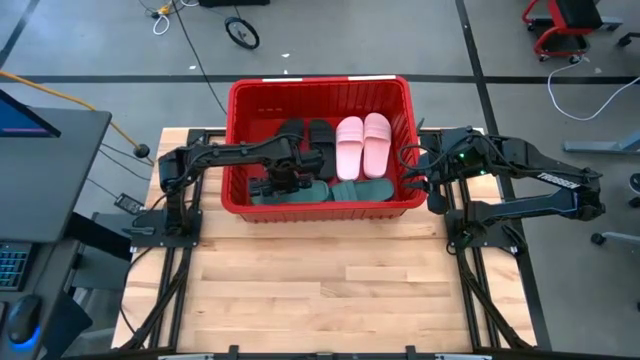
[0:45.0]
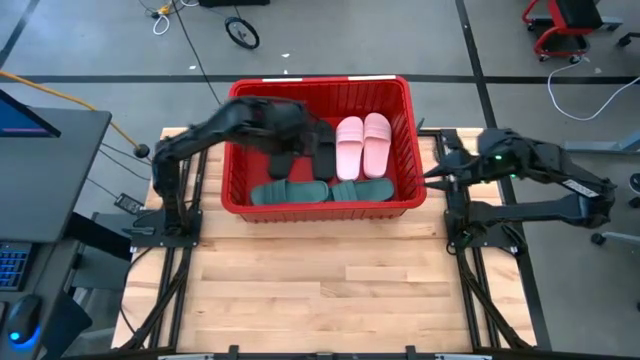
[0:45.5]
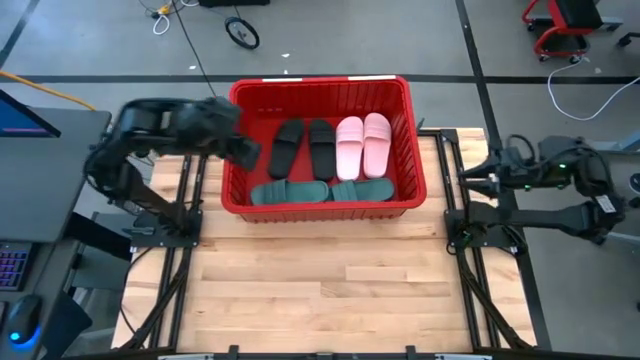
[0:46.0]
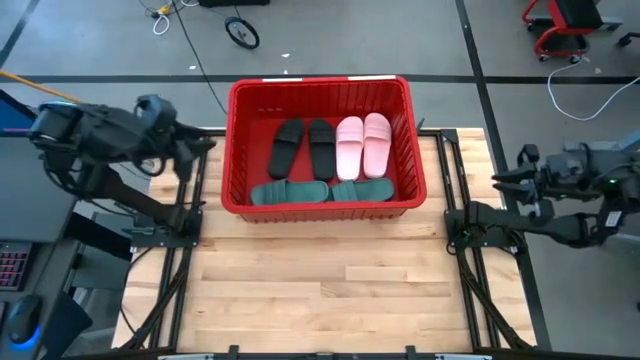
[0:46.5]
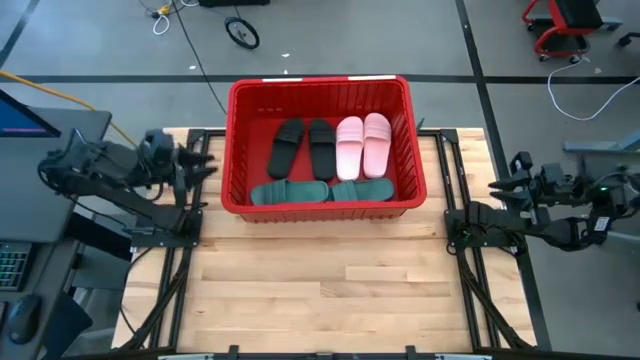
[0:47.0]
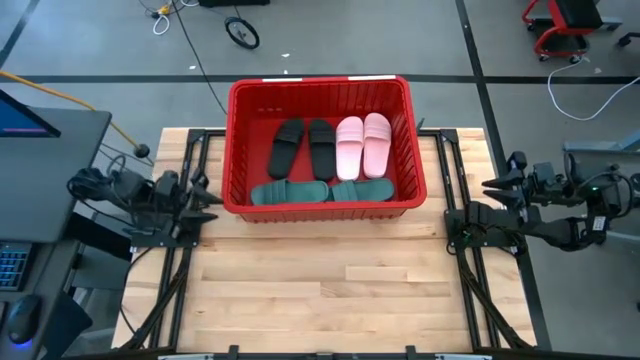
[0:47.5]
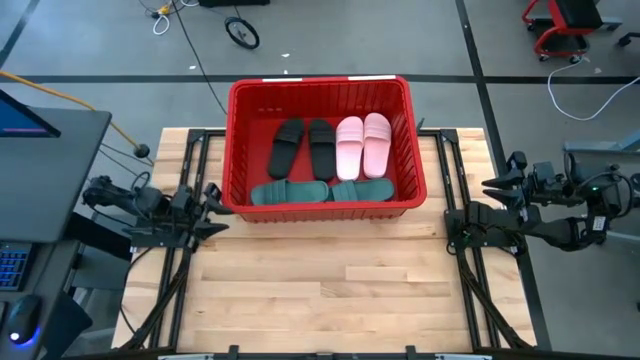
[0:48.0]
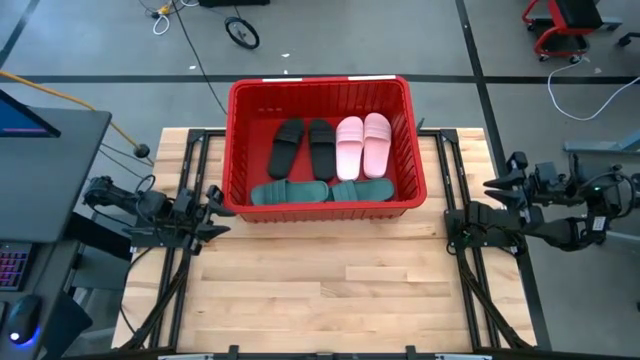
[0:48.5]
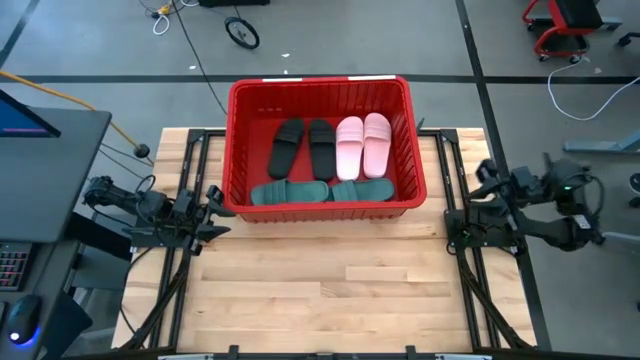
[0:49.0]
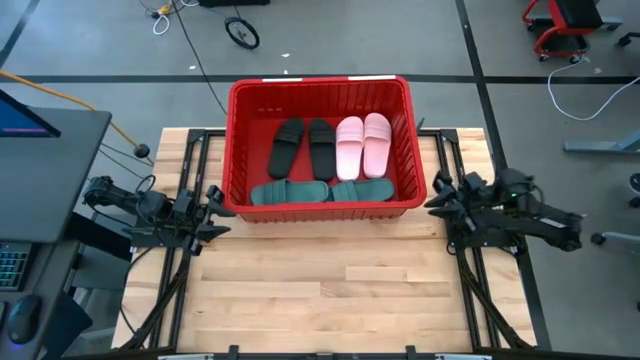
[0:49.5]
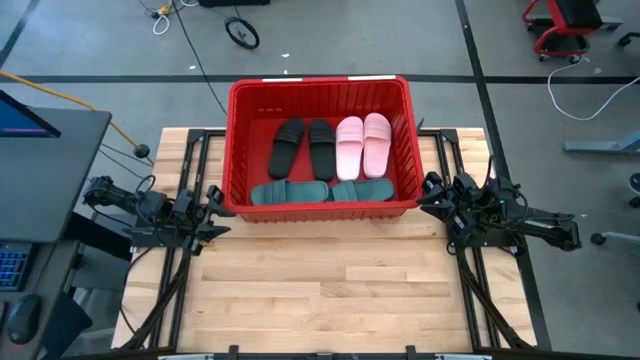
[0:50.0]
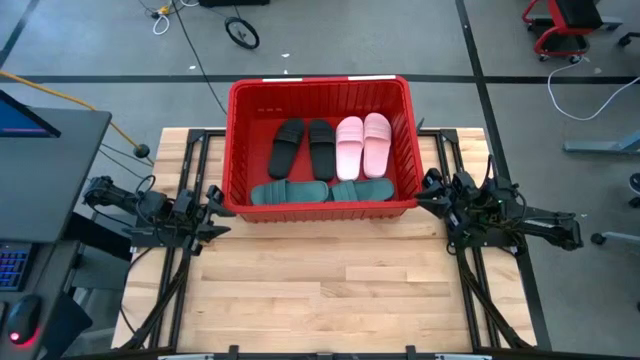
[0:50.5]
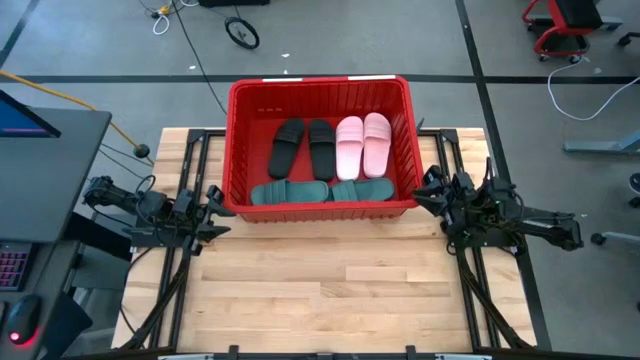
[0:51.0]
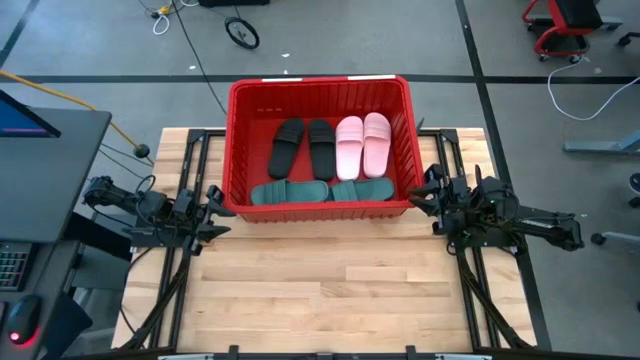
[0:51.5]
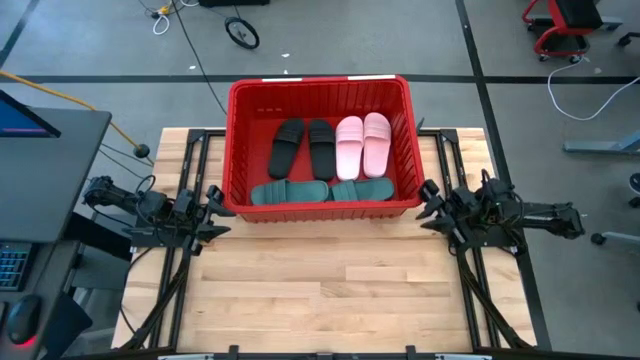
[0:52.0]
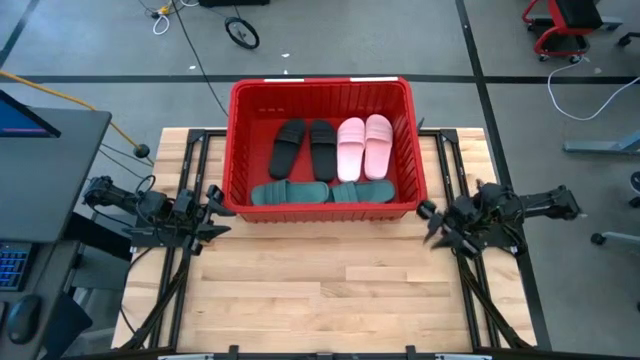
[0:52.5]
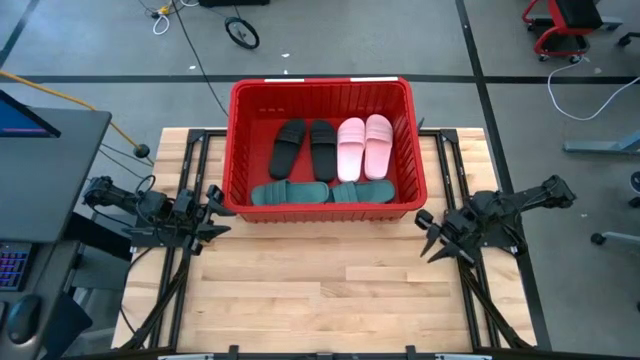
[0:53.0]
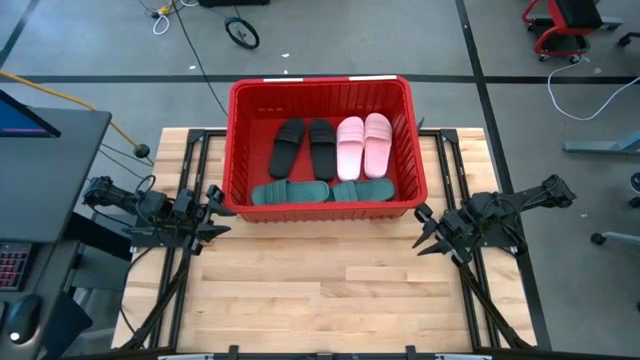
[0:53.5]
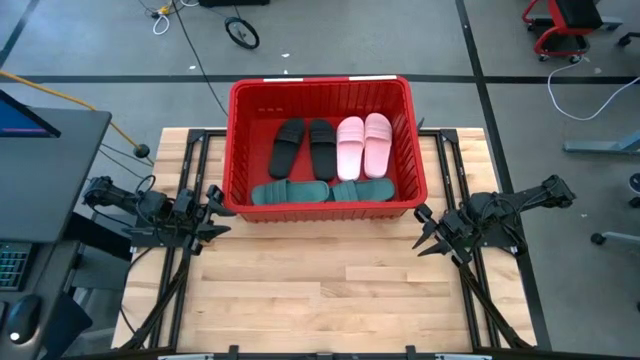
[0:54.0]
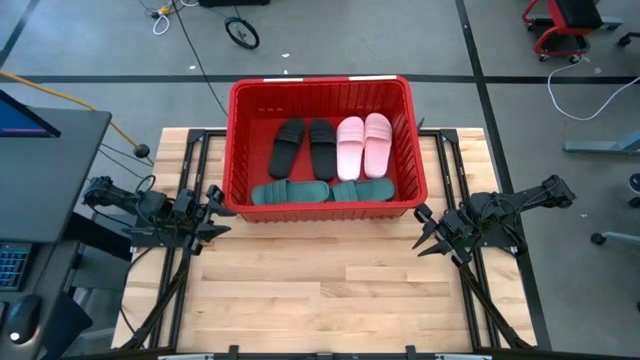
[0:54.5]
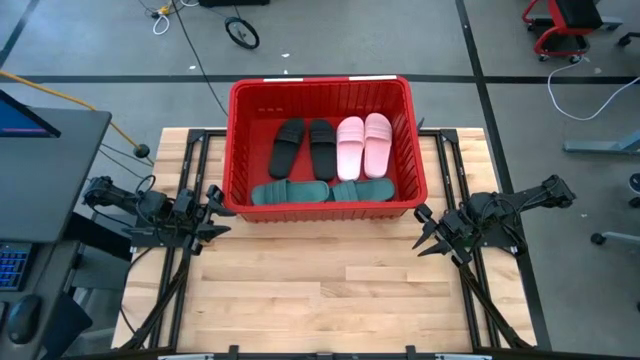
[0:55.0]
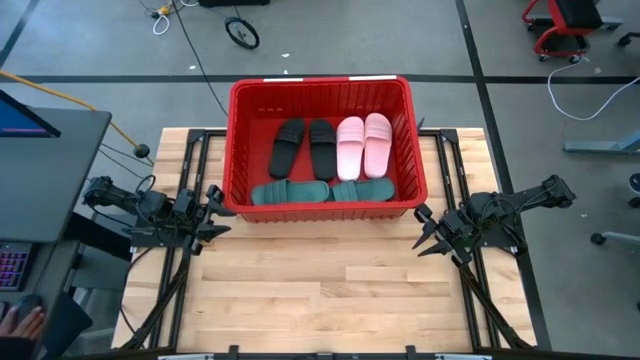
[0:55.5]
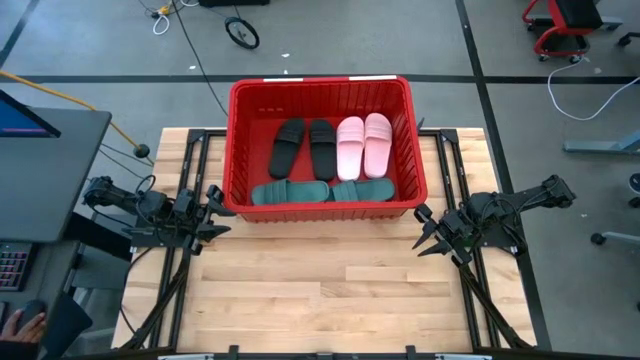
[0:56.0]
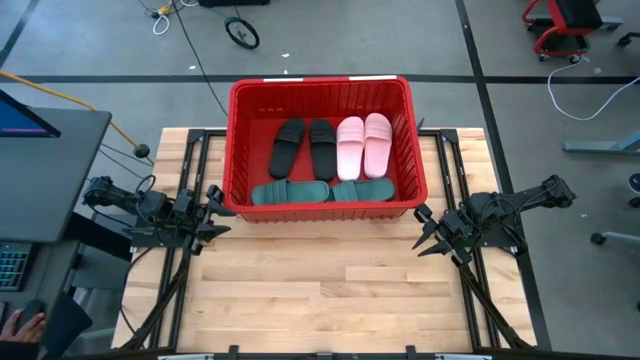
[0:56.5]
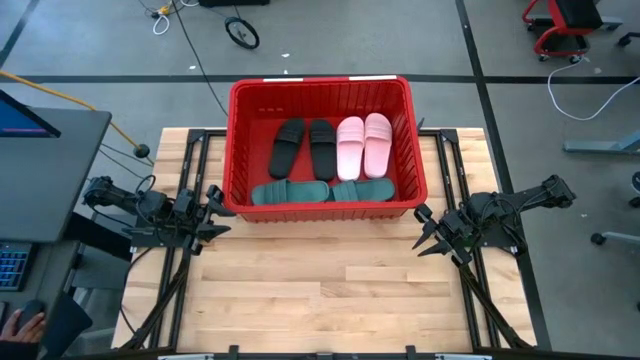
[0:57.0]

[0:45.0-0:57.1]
Task: Pick and place slides into bin
Return to Home Position

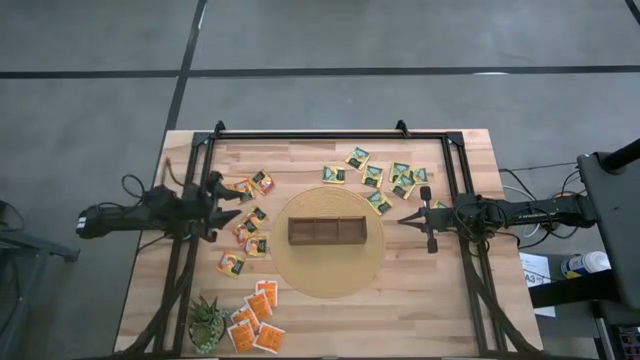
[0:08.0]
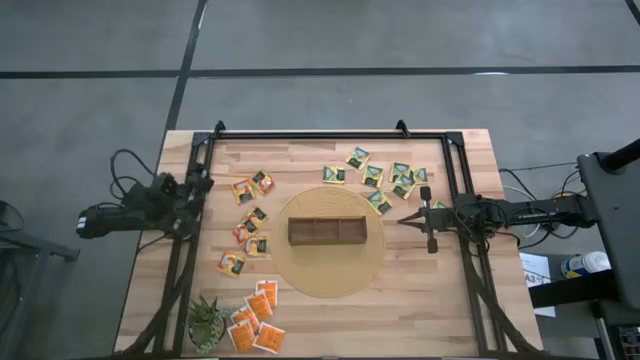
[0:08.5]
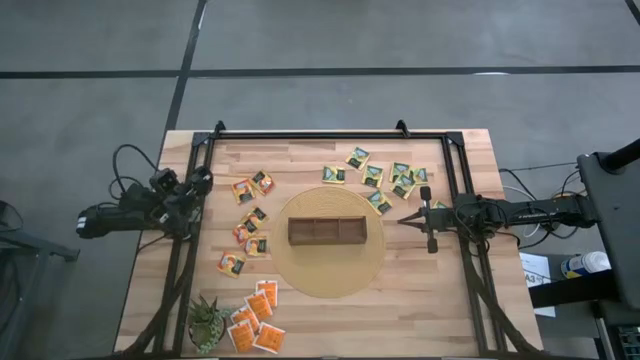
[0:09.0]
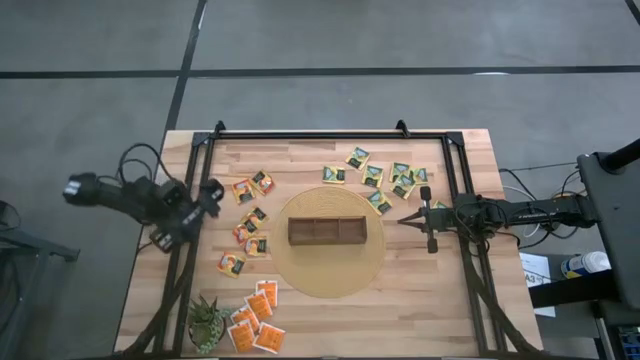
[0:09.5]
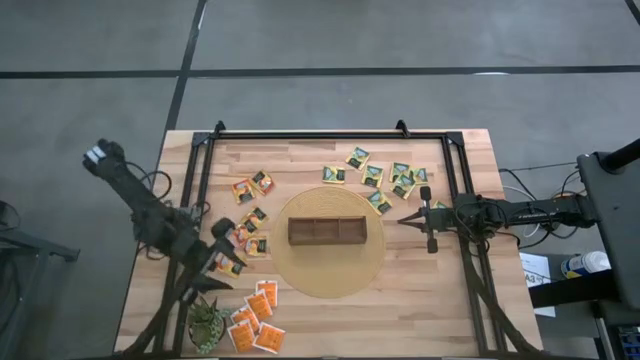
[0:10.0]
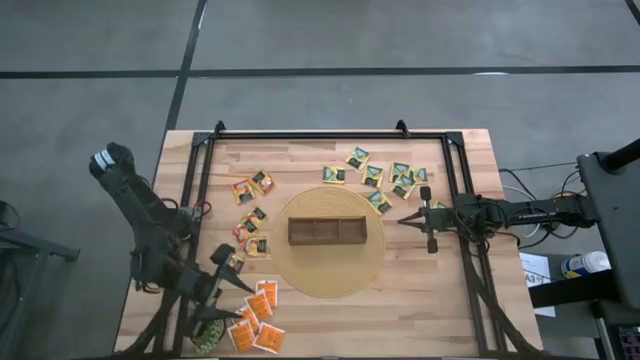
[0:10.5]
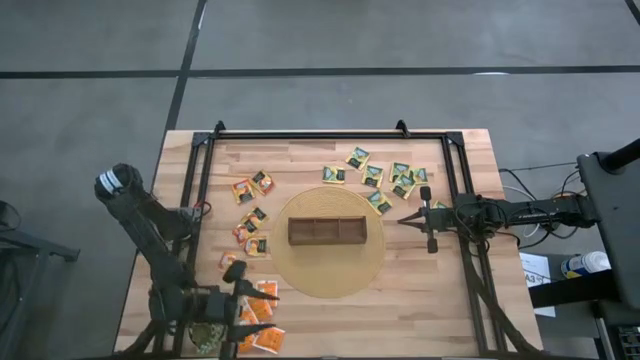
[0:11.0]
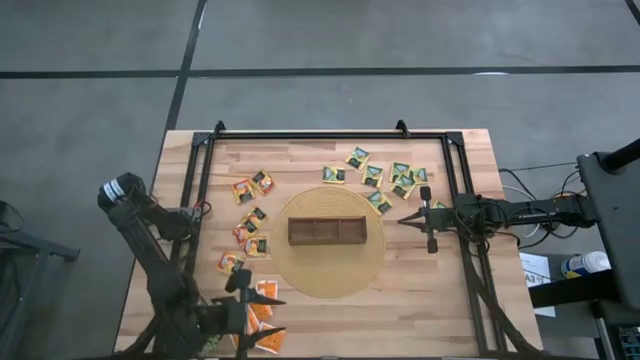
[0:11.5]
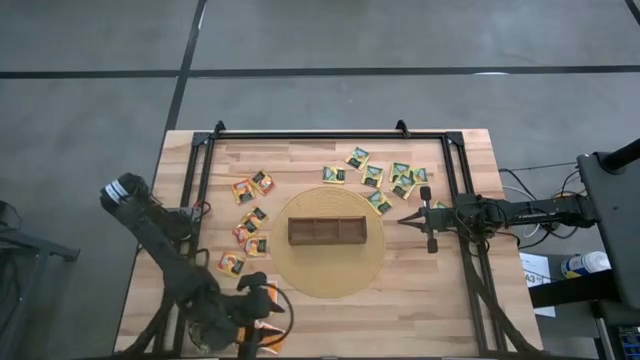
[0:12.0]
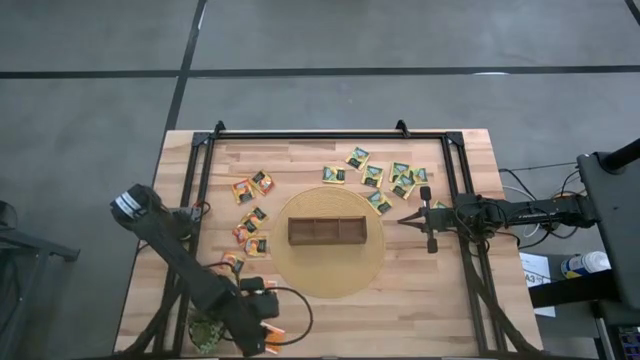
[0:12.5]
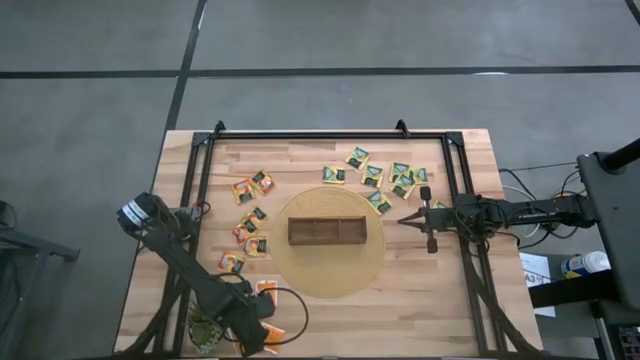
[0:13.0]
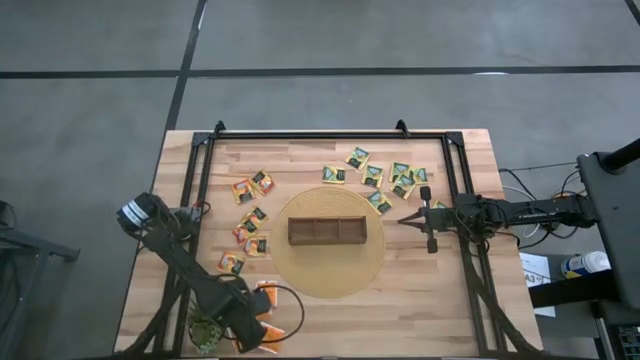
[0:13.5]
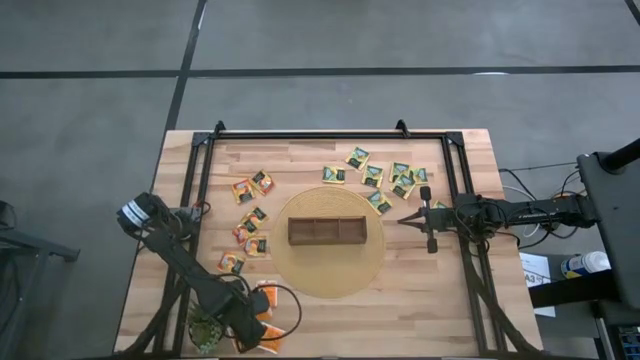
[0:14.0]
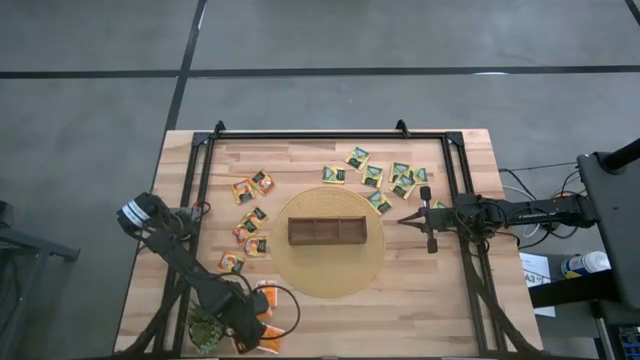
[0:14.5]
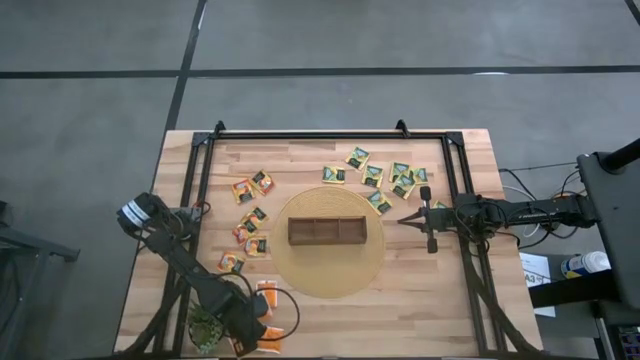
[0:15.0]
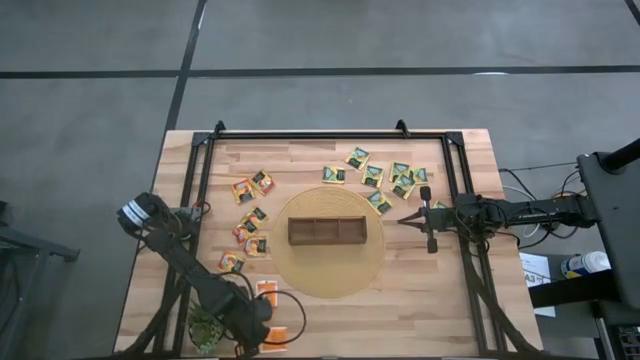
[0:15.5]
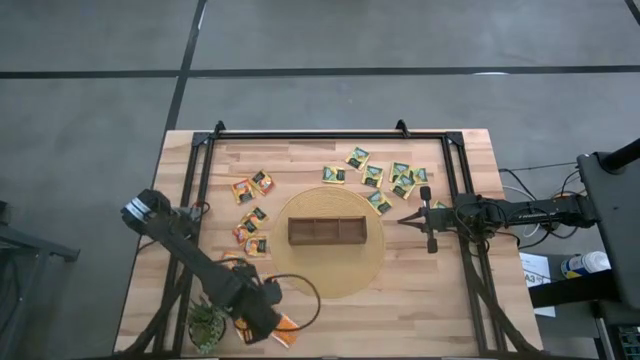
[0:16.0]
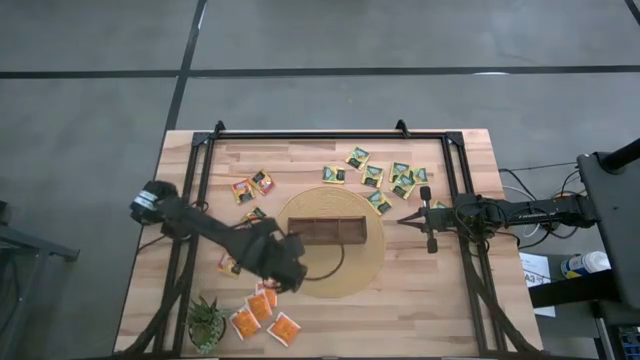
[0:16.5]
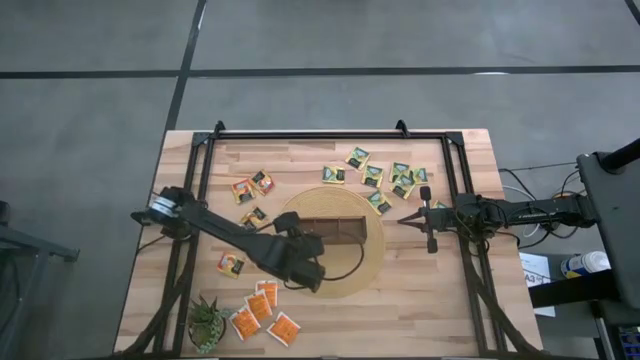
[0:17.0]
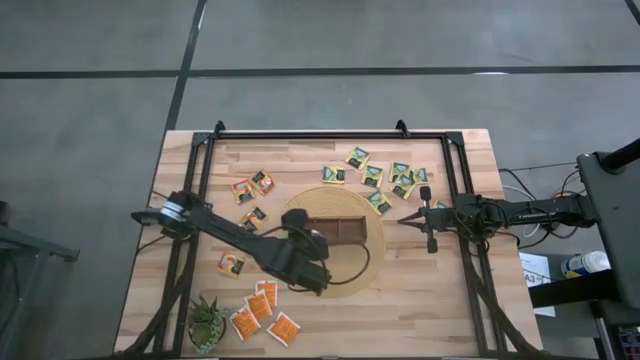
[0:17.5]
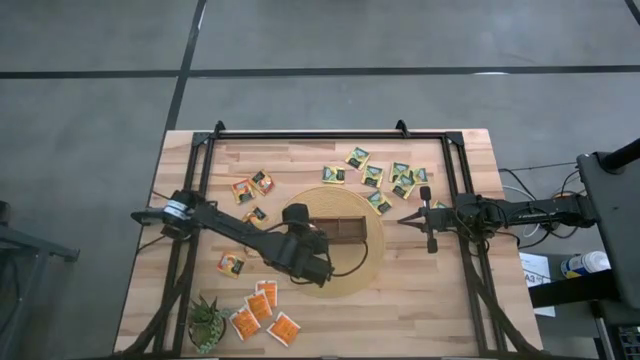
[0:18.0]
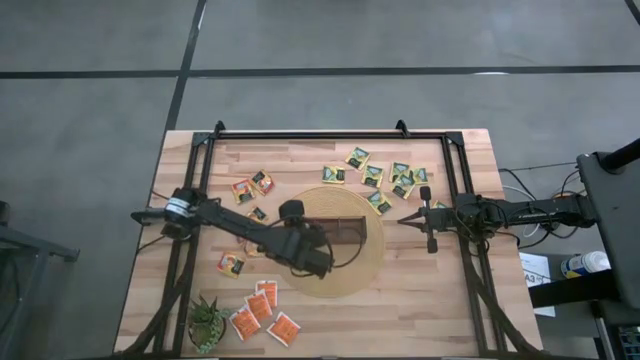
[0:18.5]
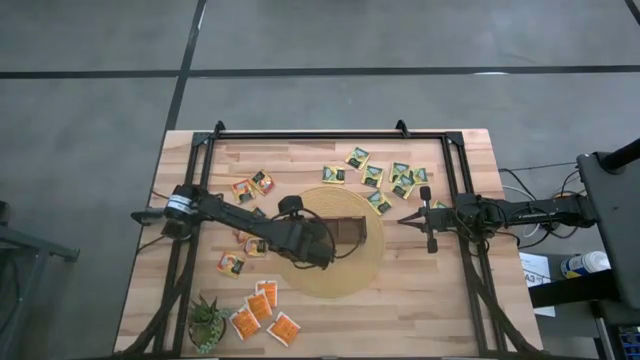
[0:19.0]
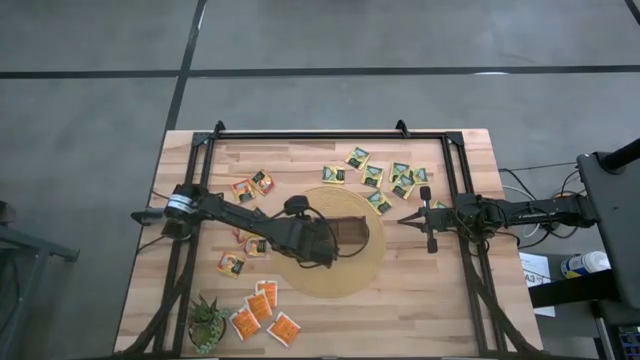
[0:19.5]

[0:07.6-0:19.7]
Task: Pick & Place Tea
Put the white orange tea bag into the left section of the wooden organizer
